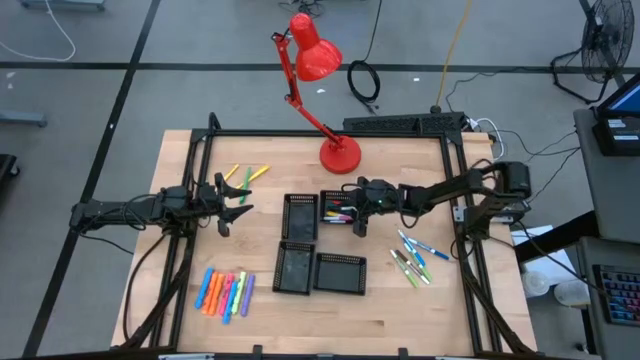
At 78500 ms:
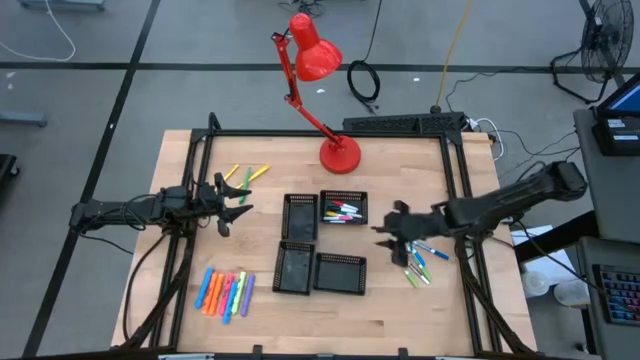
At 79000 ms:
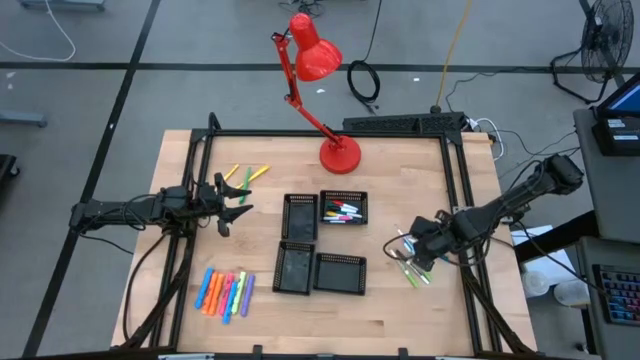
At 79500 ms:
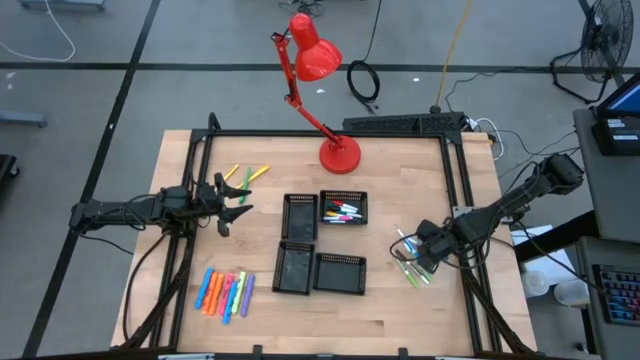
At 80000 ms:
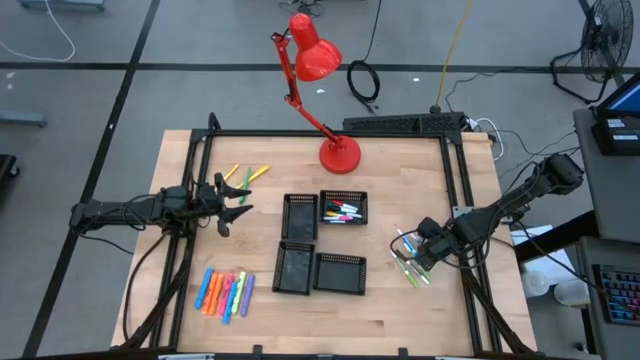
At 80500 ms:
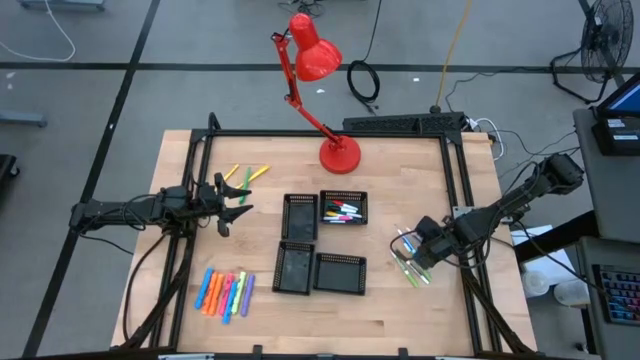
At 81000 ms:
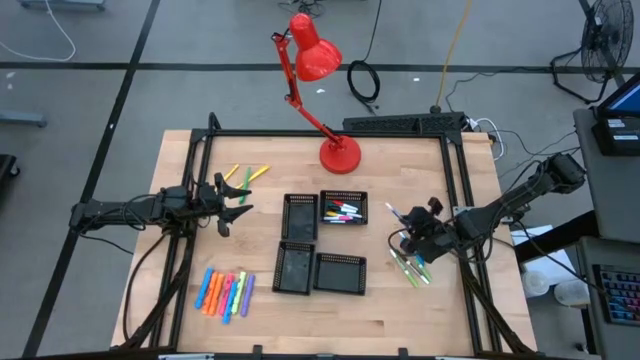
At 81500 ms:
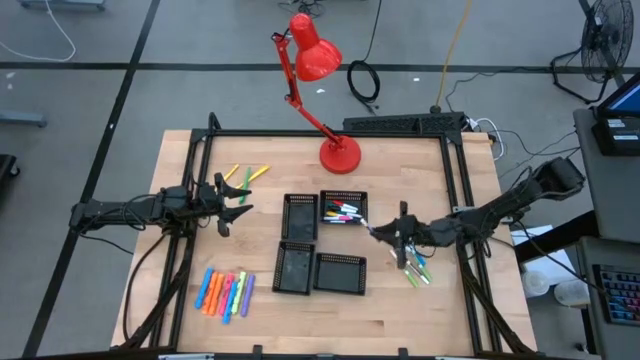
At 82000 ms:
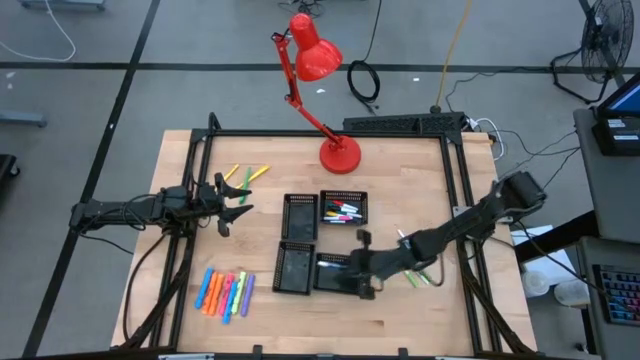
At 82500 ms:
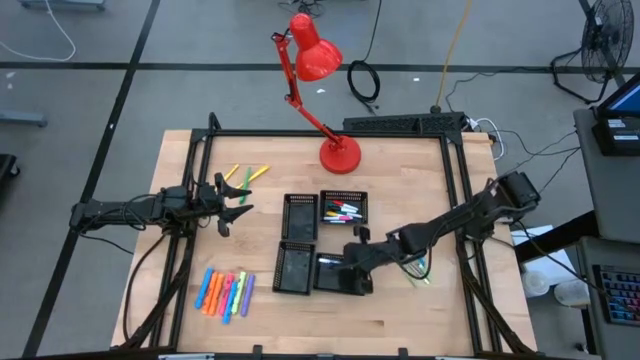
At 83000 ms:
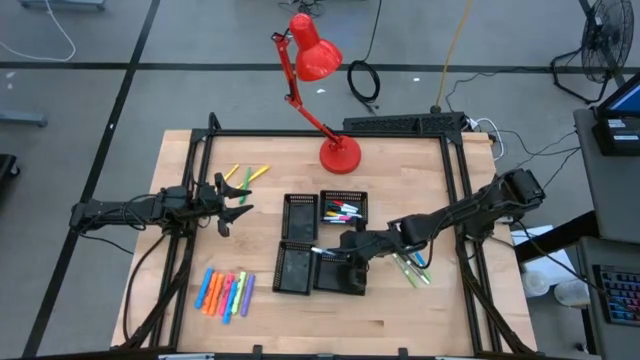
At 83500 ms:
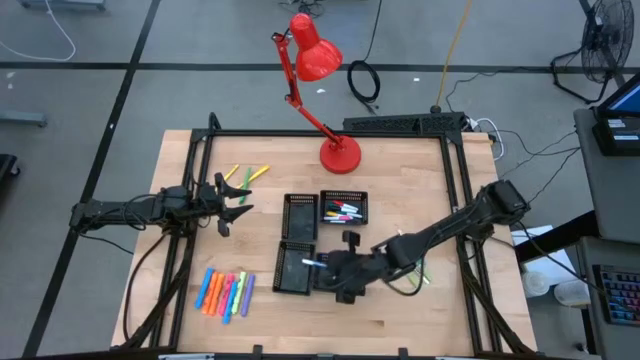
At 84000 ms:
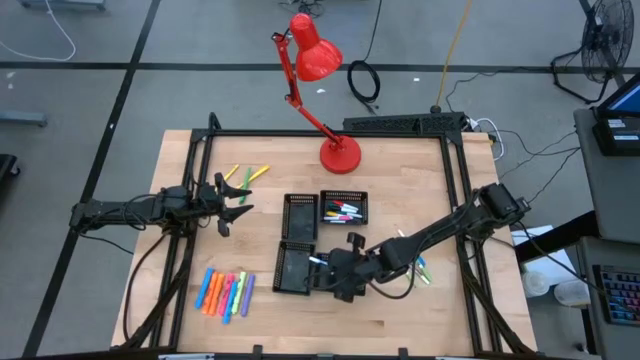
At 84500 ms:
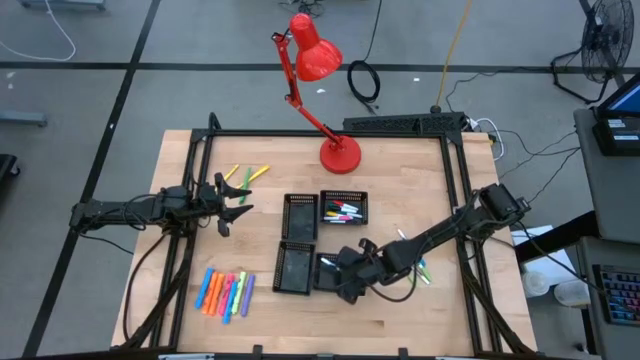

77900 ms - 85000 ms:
Task: Pick & Place Markers
Put the blue marker pen into the bottom right black bin

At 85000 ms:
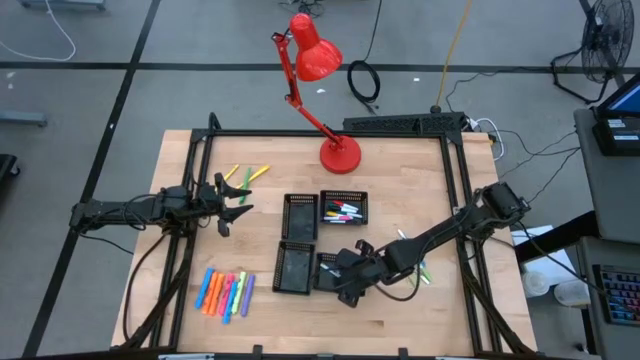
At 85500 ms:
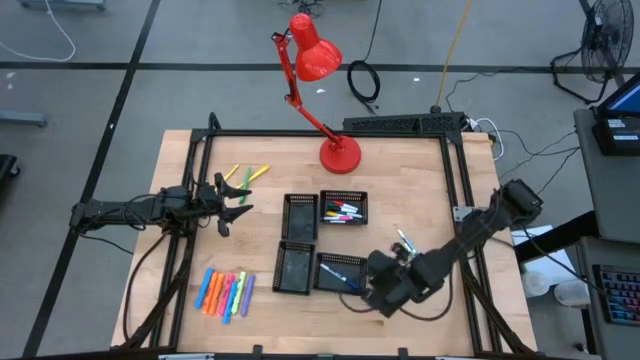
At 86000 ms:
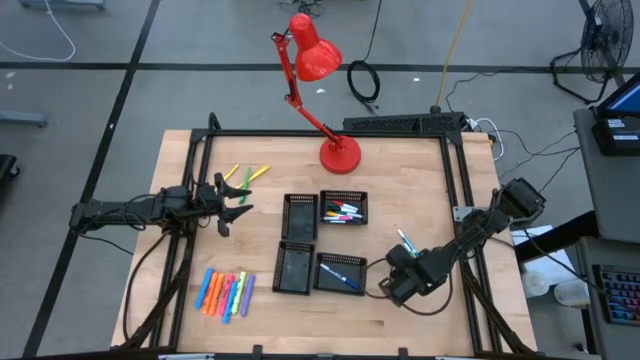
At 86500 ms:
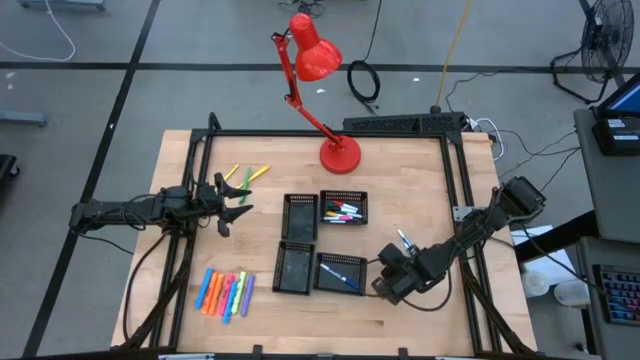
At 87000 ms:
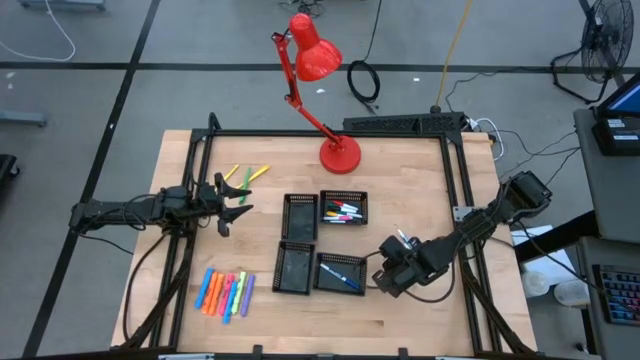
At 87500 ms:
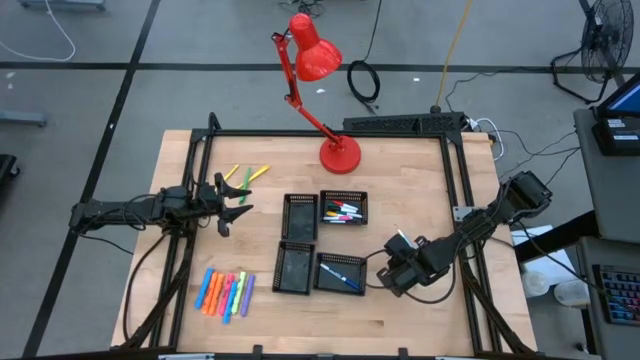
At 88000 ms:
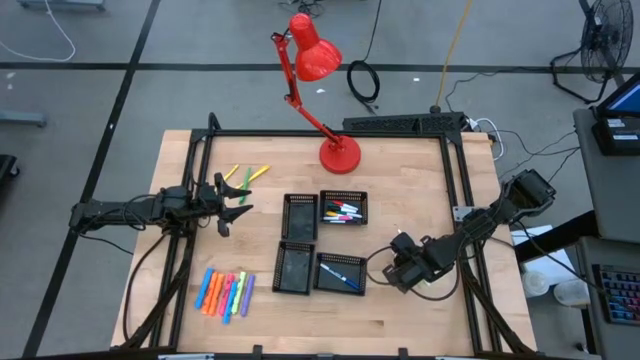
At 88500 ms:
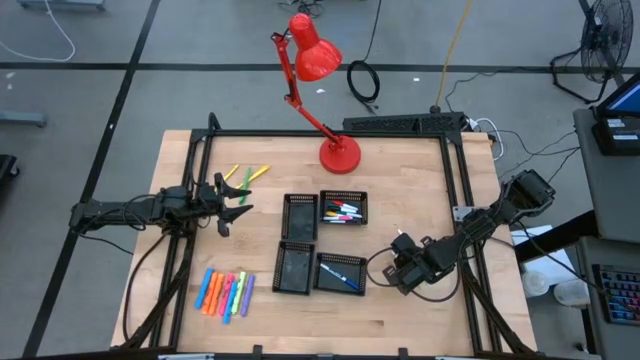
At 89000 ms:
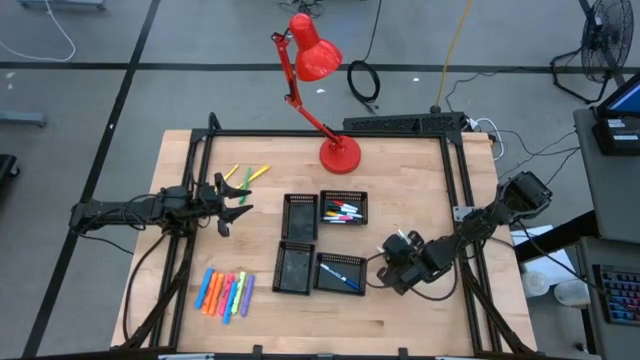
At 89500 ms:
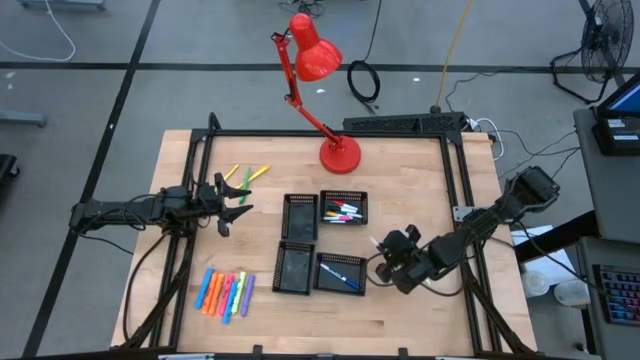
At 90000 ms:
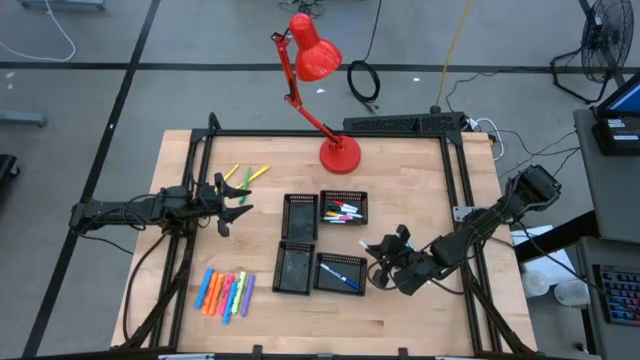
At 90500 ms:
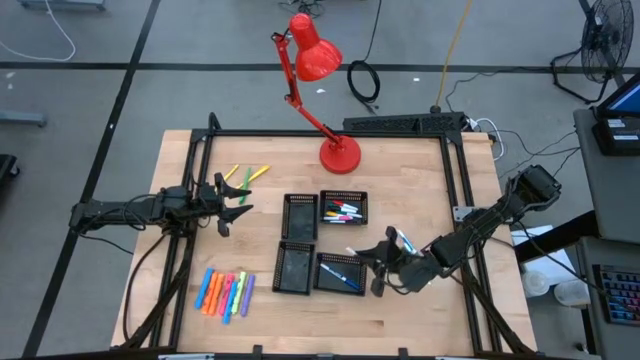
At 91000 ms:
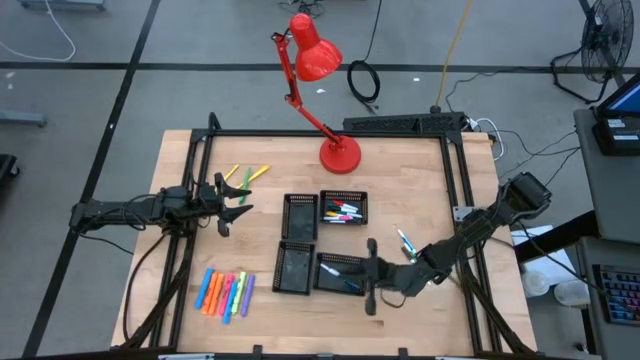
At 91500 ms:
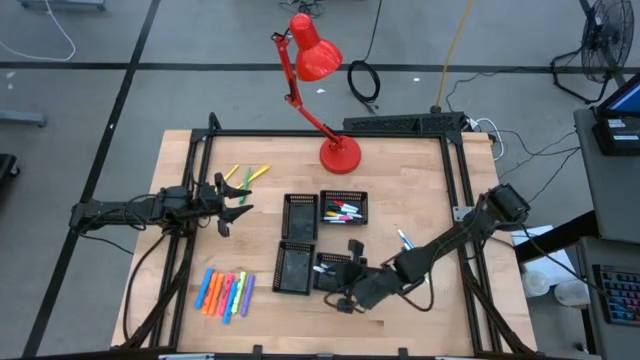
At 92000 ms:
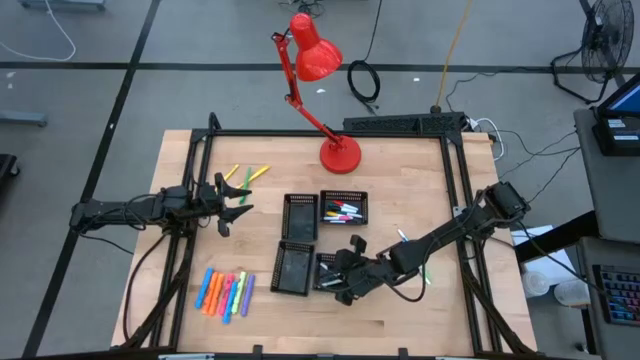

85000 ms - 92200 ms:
Put the green marker pen into the bottom right black bin

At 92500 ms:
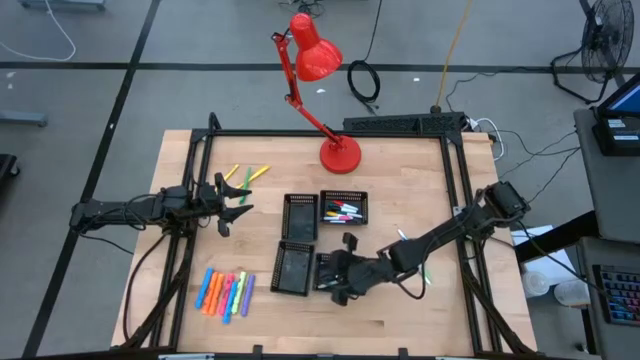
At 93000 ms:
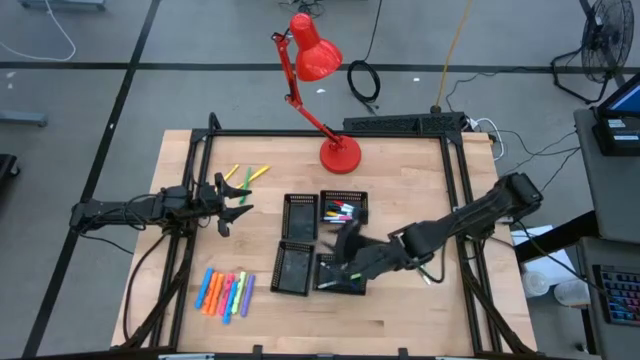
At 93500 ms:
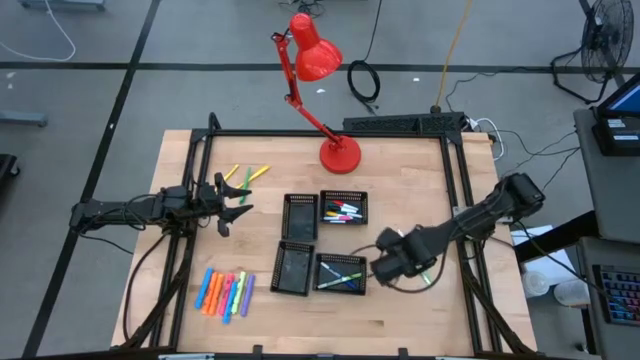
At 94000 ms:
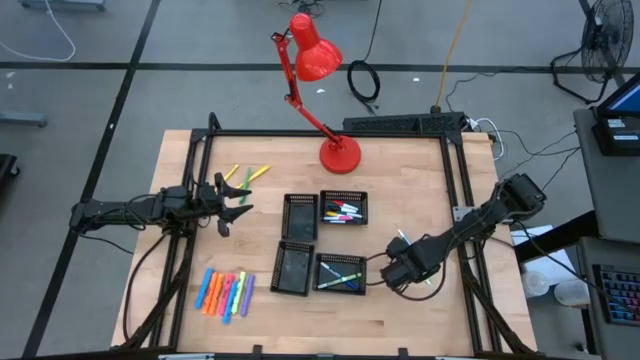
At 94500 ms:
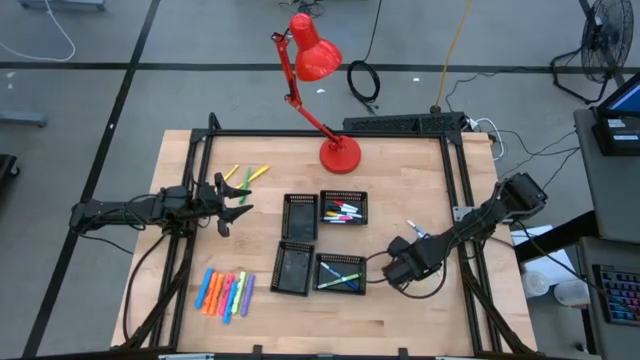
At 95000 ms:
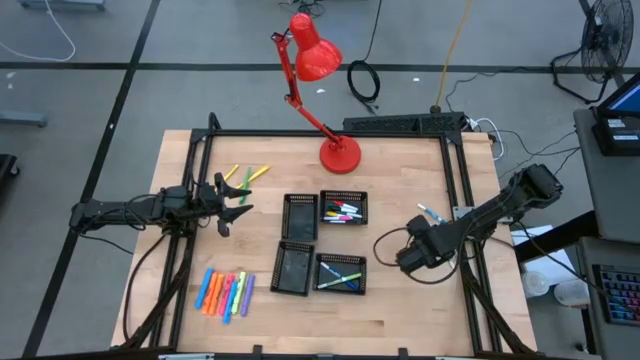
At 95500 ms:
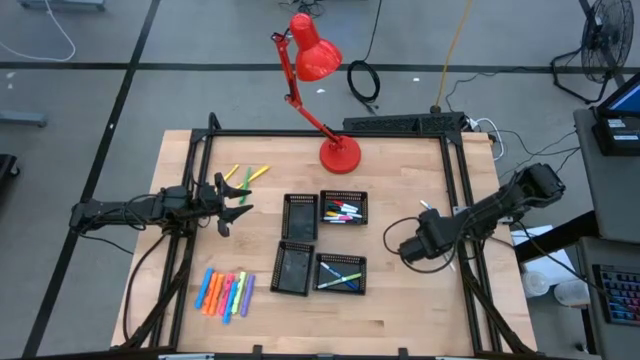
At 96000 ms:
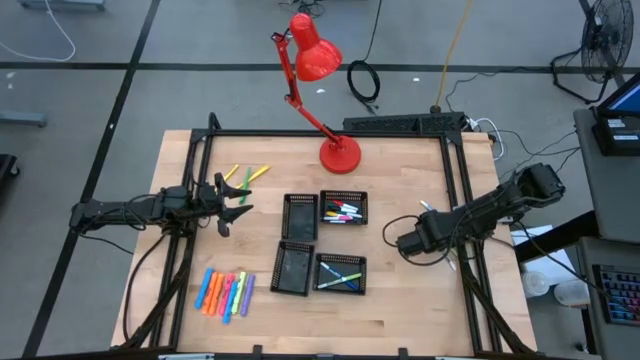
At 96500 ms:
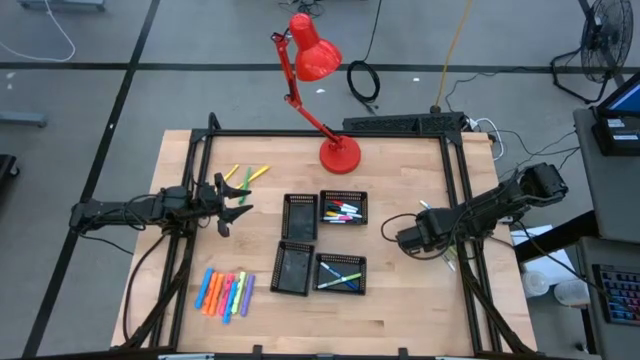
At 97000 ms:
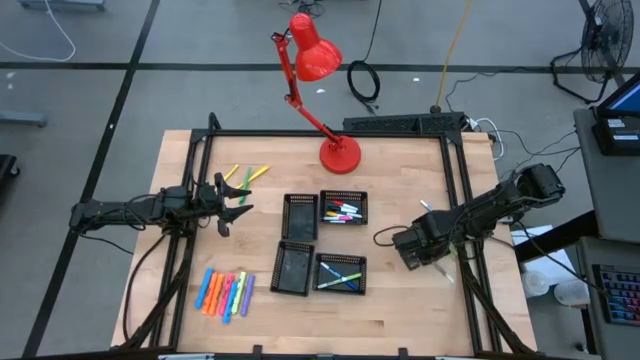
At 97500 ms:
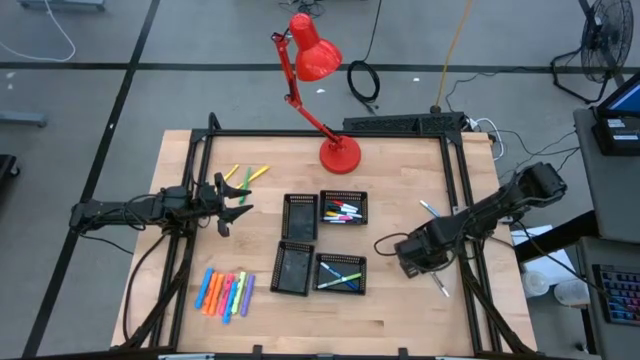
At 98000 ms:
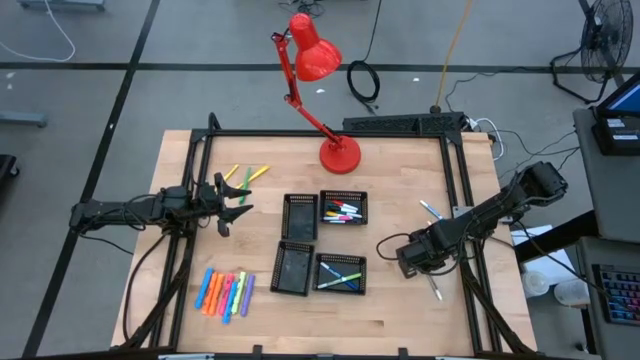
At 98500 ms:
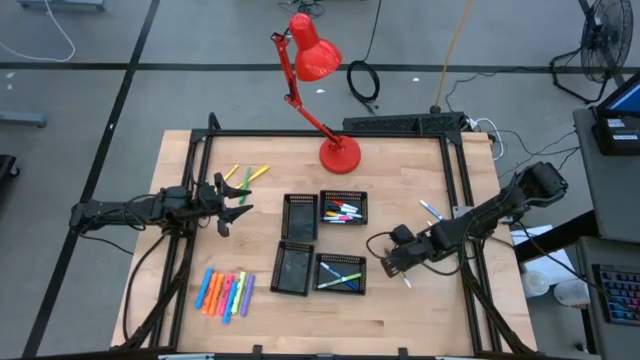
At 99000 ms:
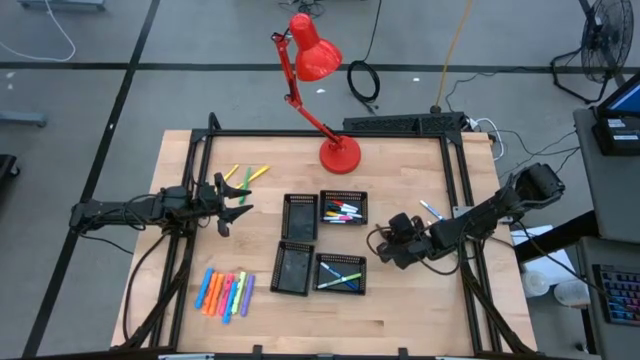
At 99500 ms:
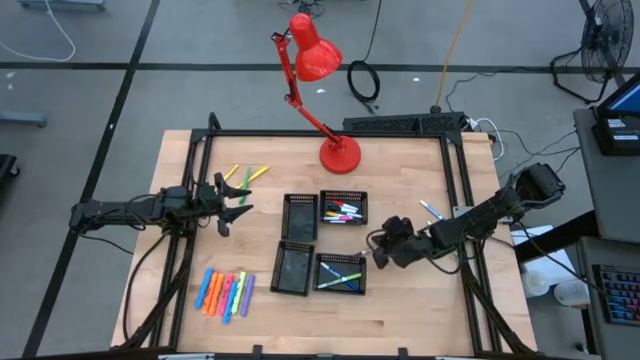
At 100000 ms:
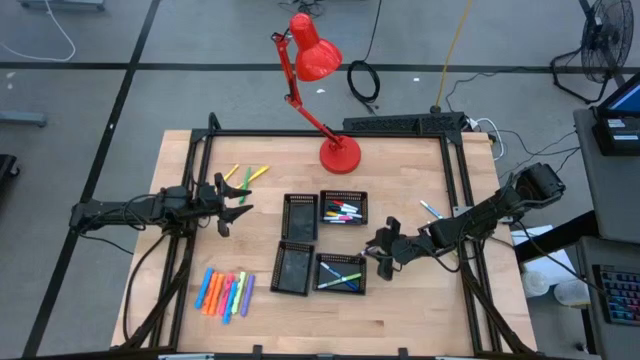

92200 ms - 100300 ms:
Put the brown marker pen into the bottom right black bin
